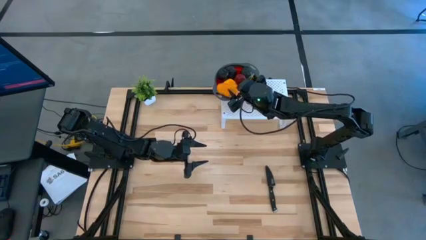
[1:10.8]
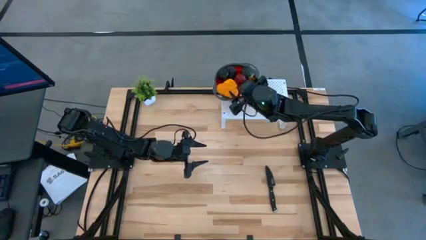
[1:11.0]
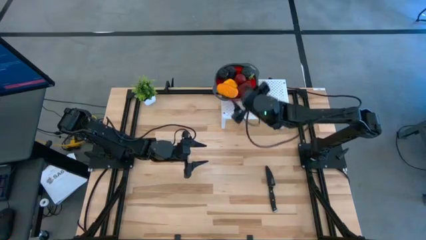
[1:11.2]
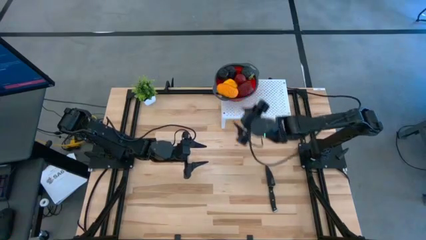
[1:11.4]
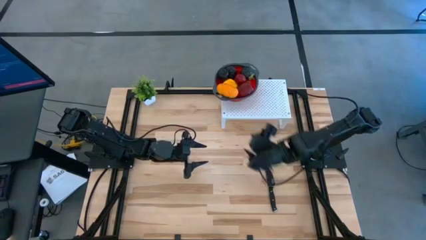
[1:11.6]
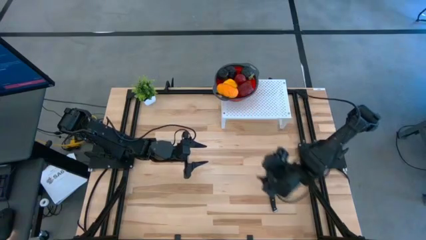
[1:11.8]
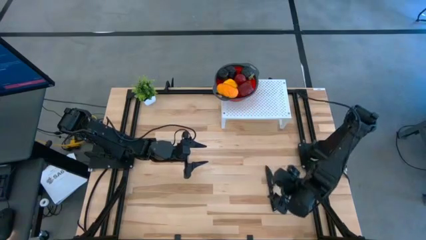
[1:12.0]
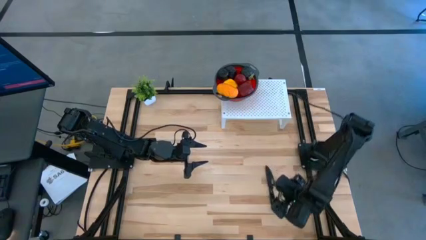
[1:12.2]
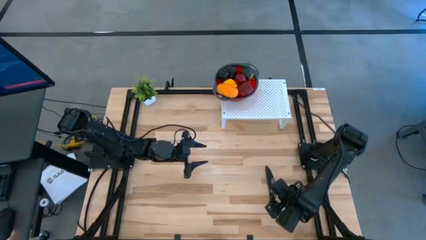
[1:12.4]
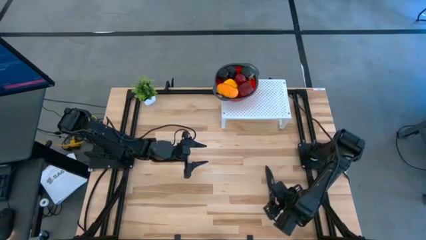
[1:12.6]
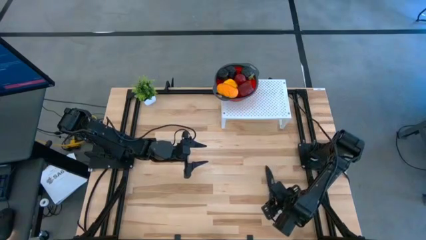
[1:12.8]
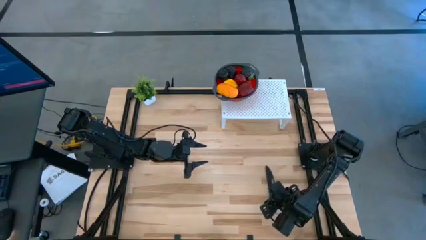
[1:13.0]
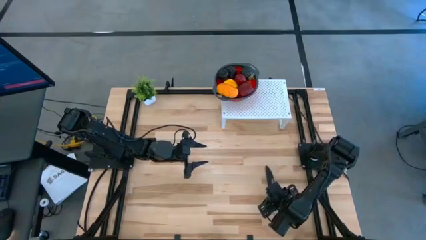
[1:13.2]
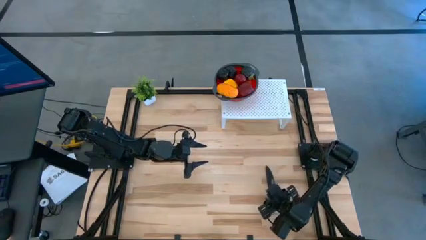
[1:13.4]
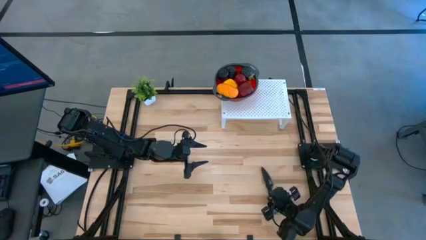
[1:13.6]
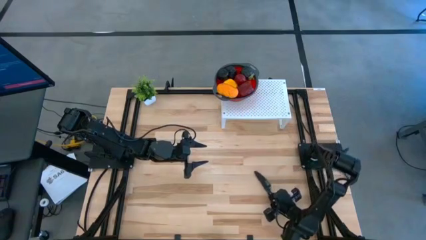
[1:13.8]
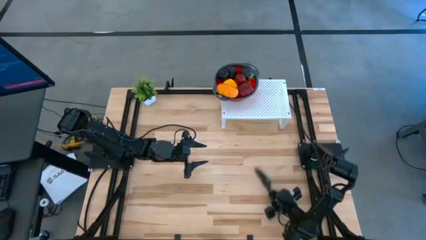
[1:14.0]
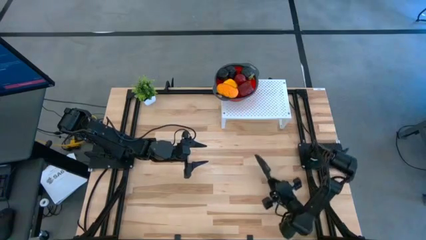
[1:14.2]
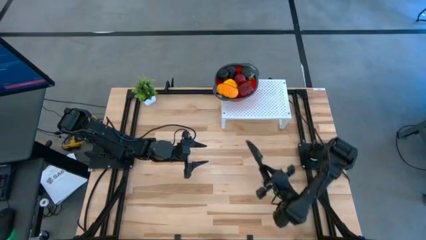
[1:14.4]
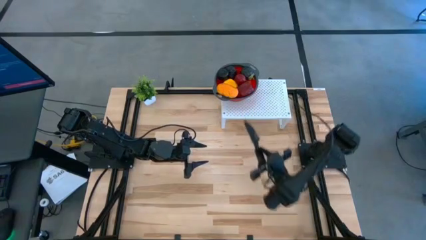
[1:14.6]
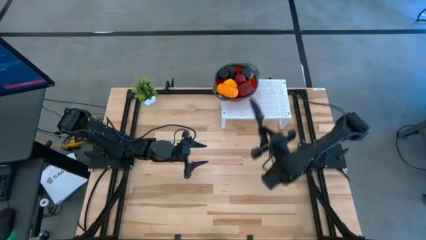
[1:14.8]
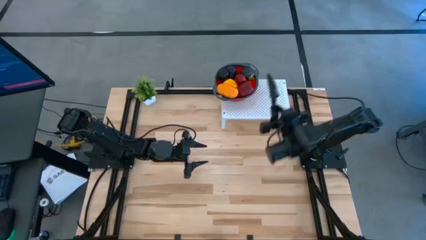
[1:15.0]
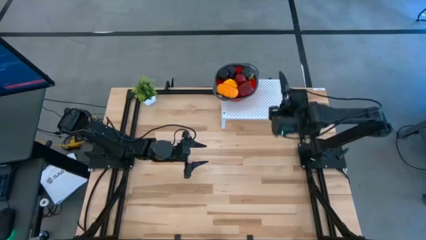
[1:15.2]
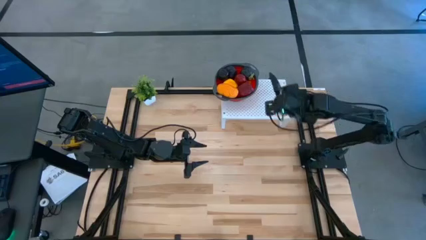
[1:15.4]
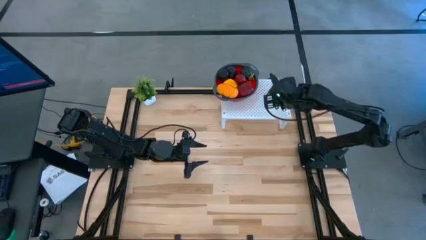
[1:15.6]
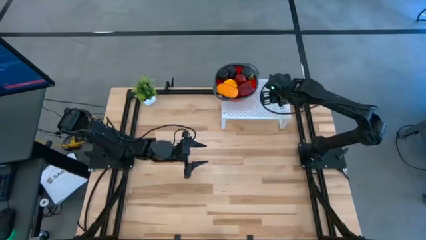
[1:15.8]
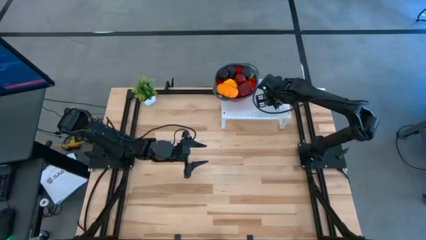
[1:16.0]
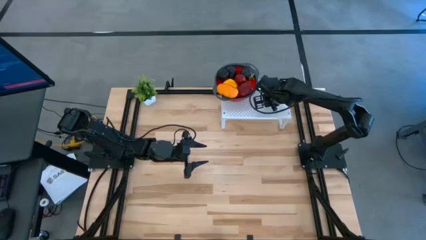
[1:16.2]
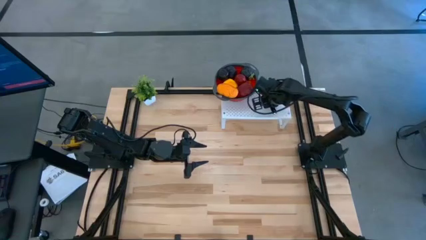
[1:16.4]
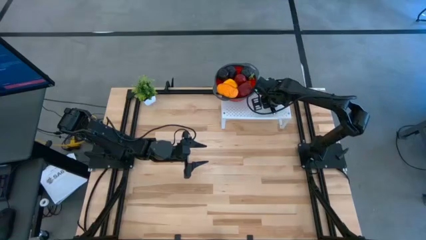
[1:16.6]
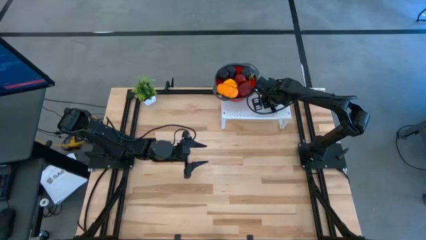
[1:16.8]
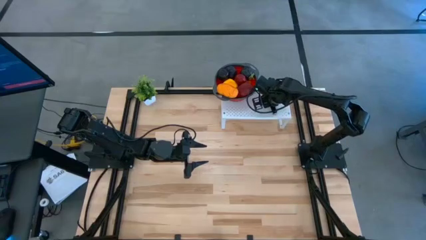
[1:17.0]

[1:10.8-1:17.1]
Task: Pick & Place Fruit
Put the knife on the shelf to the right of the red strainer bowl

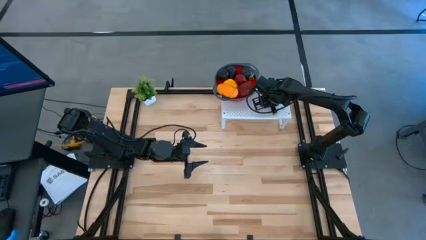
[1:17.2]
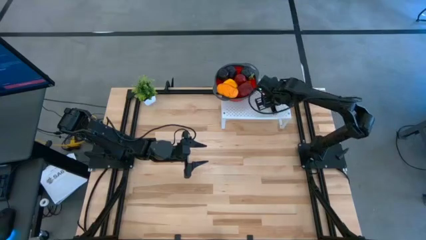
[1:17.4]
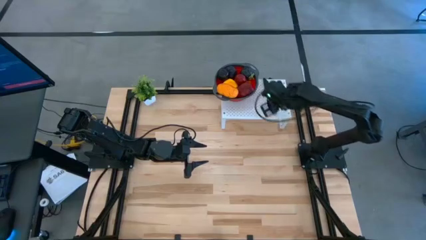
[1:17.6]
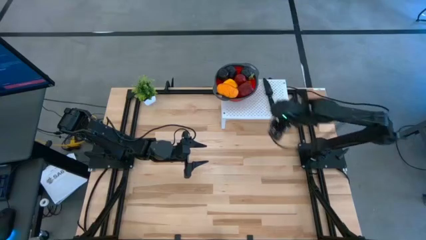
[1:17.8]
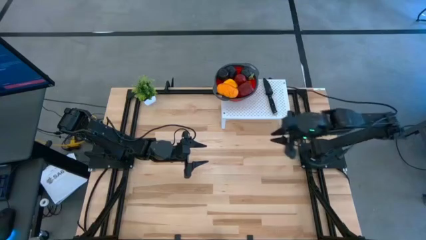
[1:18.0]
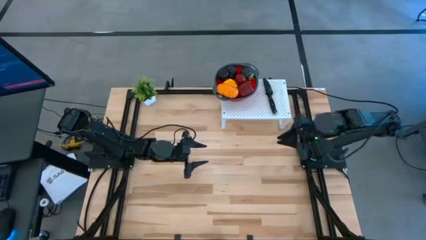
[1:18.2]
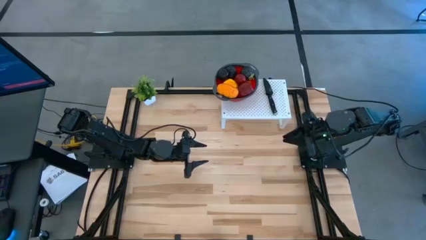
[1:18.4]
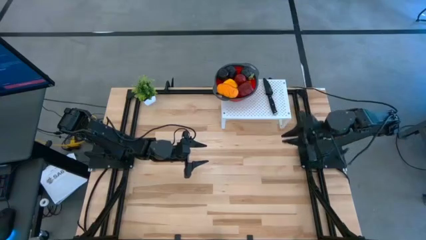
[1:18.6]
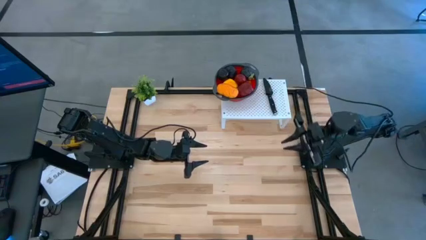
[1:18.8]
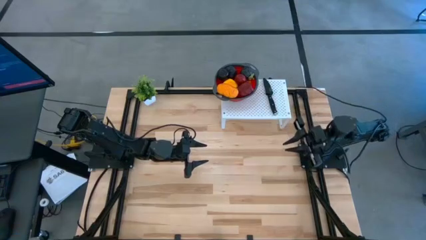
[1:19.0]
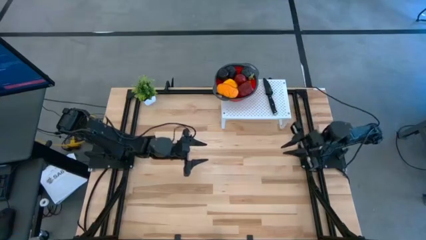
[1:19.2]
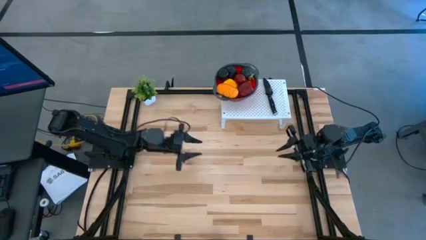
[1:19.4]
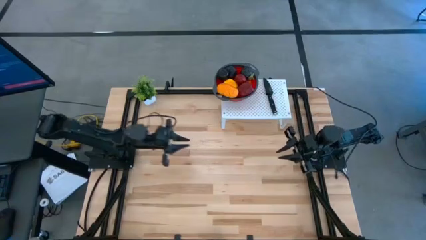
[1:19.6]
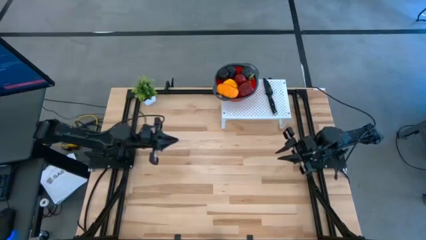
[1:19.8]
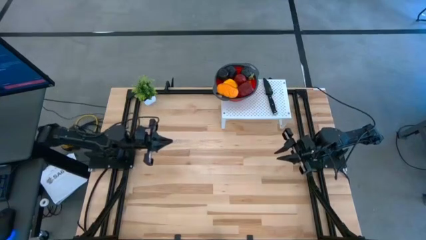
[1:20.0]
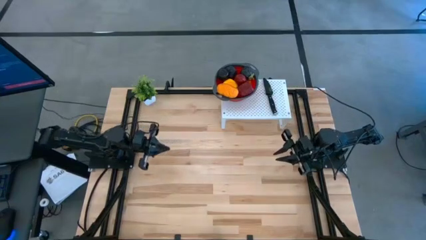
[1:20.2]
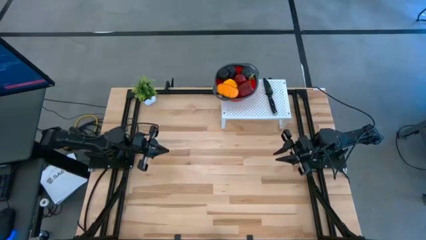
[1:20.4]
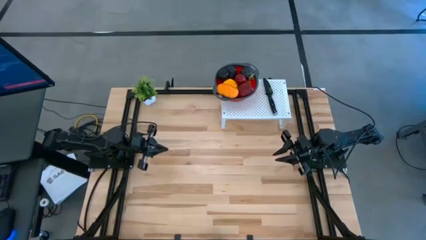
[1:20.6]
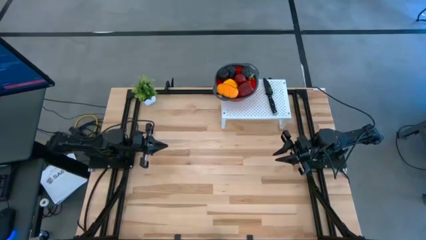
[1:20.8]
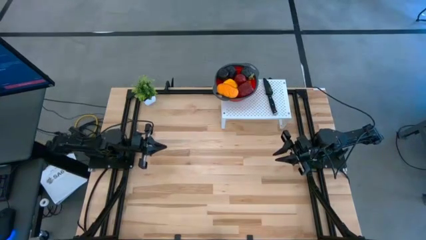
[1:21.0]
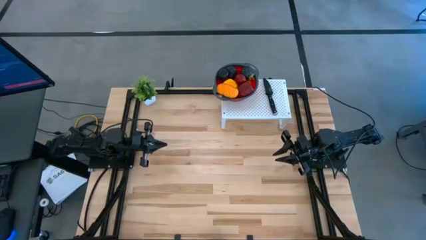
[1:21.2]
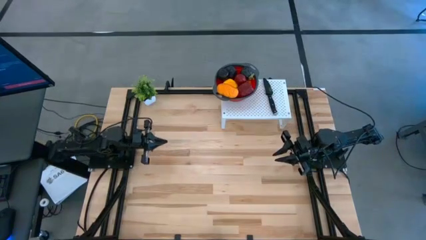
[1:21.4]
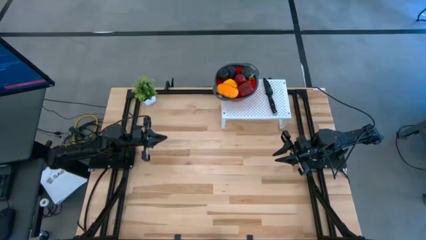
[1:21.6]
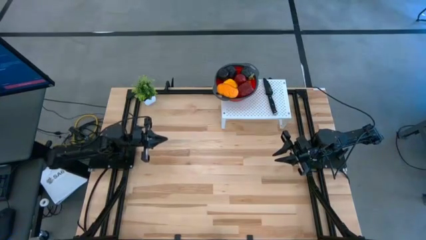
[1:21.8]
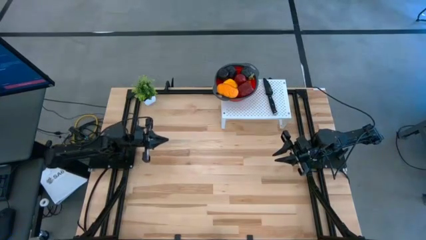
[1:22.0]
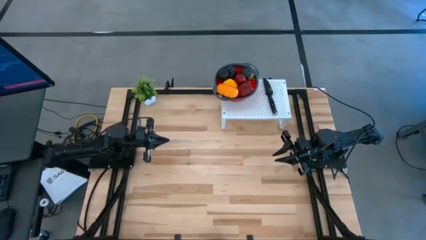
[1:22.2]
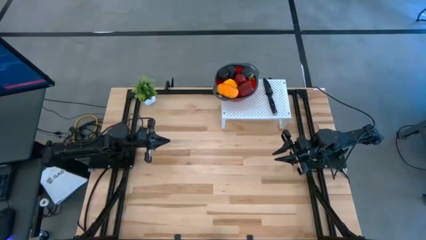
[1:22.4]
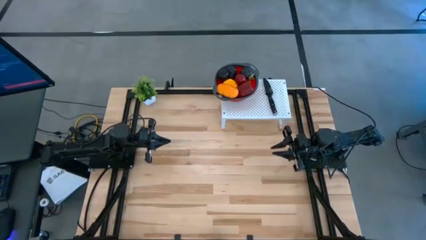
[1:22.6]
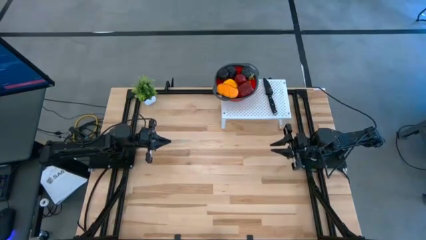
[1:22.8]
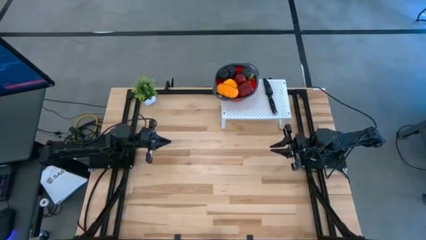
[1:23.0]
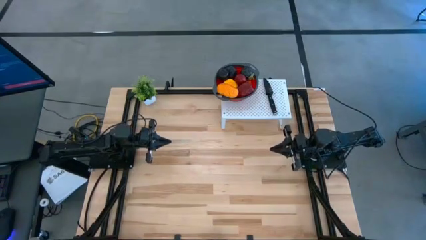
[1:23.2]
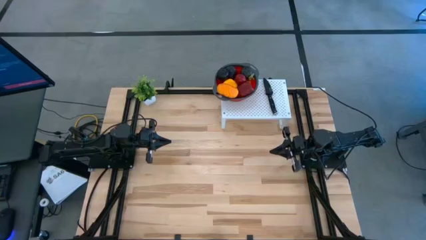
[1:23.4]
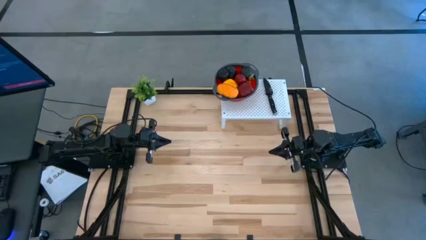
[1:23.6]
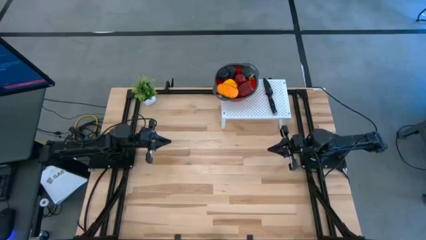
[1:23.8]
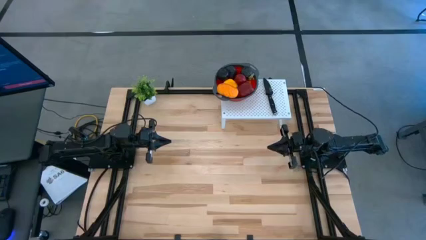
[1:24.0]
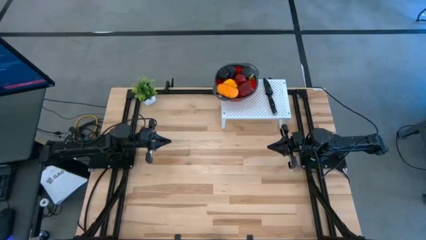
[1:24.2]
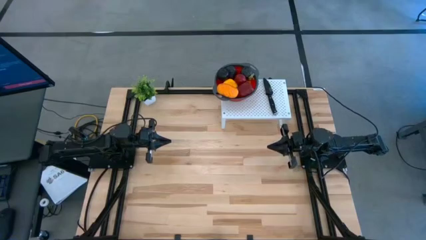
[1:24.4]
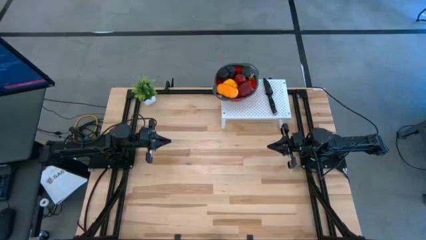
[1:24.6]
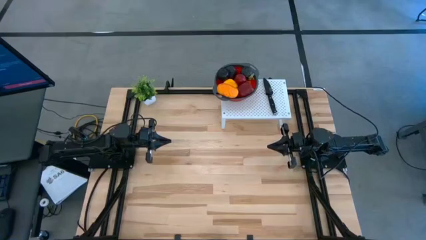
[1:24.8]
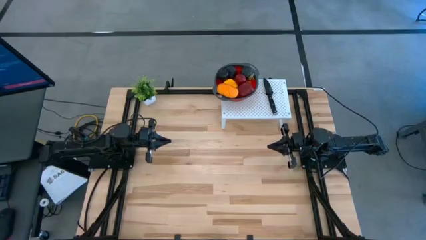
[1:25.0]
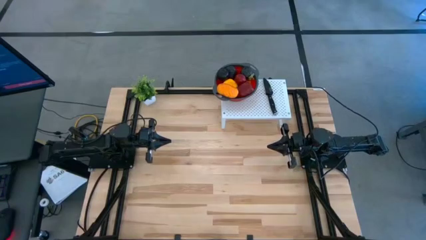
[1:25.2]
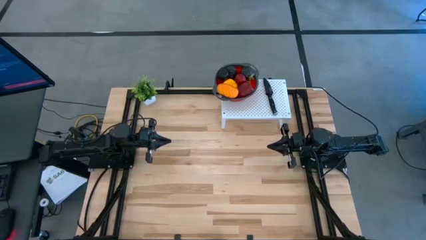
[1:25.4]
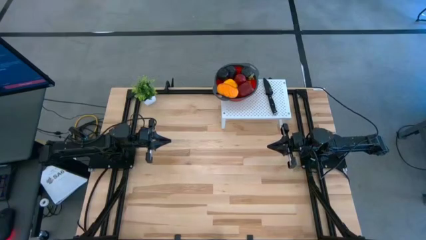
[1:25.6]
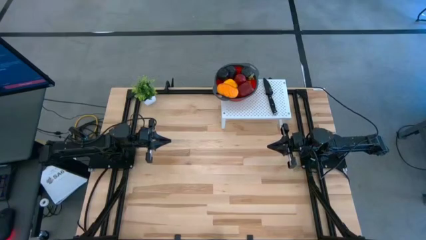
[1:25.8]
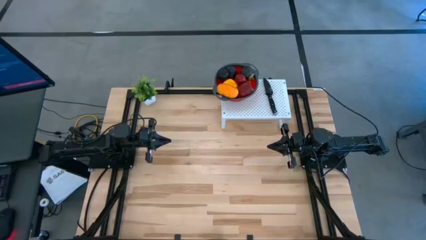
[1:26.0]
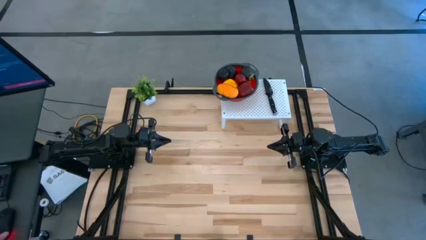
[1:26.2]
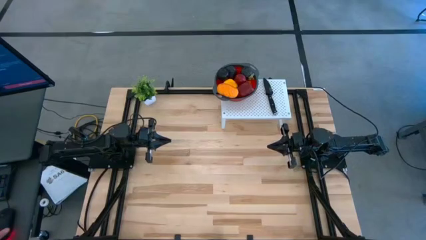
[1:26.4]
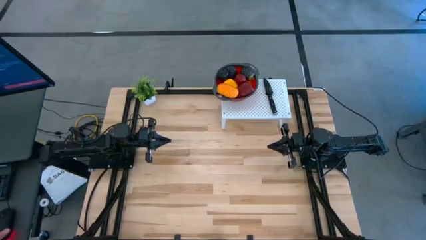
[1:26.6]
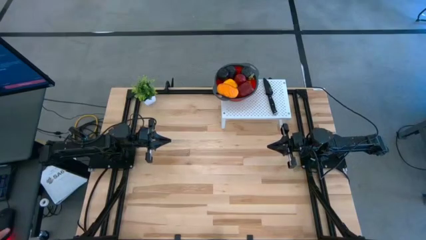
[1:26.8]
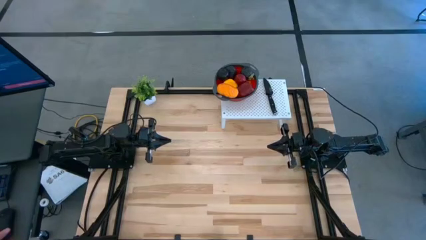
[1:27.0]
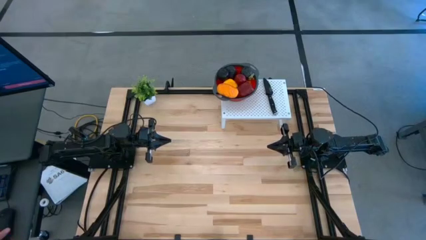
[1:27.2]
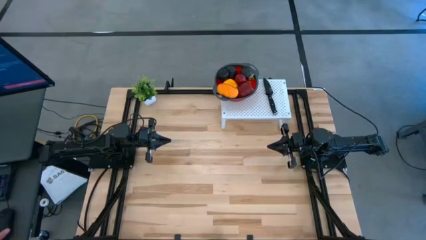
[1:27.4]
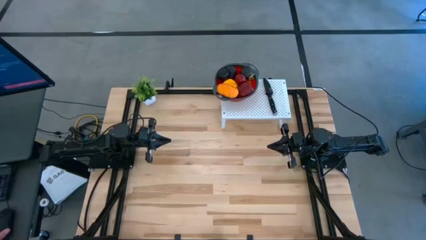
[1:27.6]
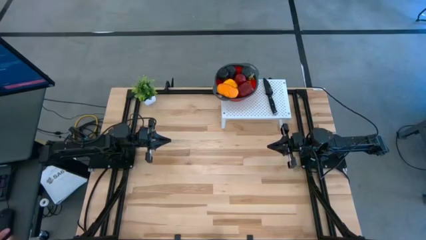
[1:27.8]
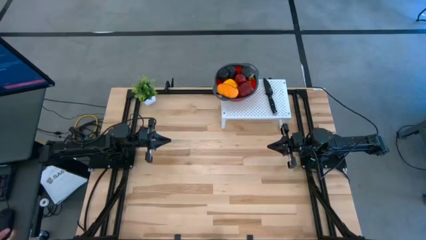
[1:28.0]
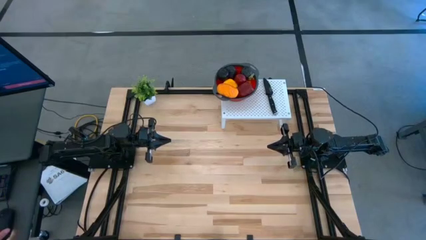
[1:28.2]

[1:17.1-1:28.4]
Return to Home Position
